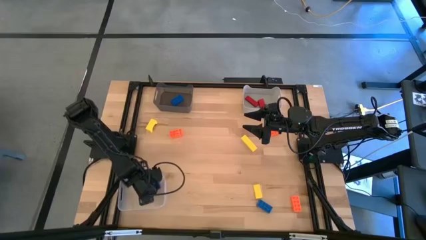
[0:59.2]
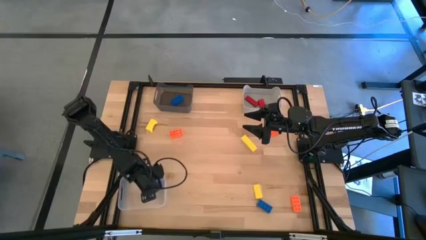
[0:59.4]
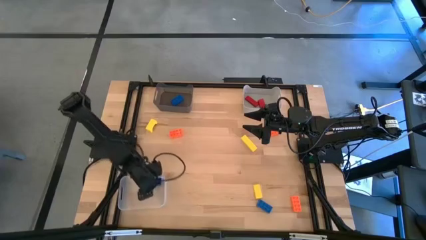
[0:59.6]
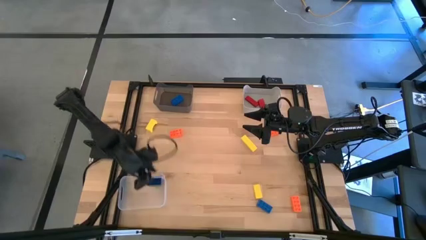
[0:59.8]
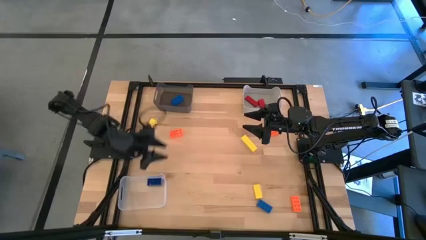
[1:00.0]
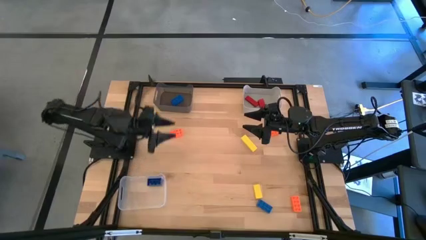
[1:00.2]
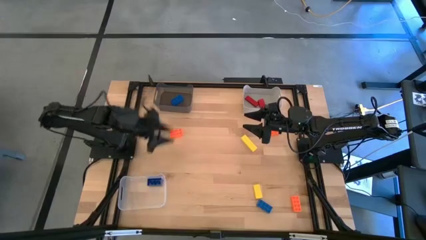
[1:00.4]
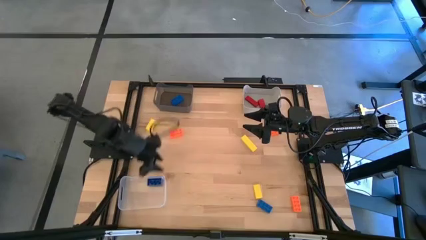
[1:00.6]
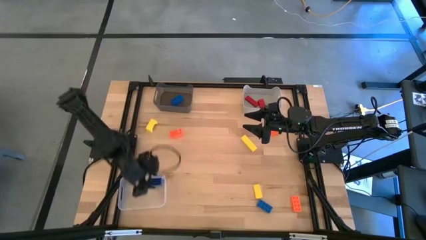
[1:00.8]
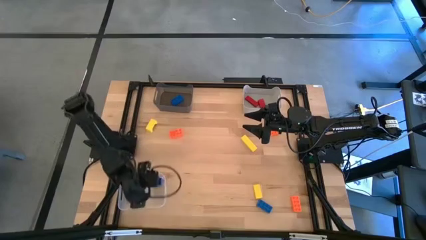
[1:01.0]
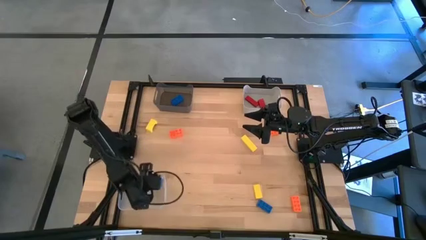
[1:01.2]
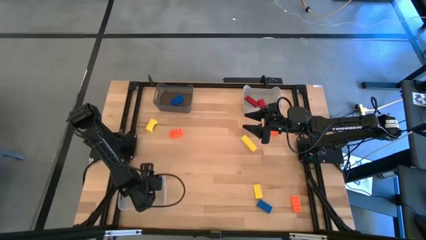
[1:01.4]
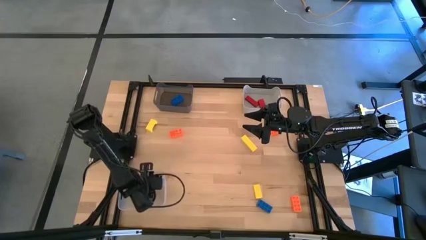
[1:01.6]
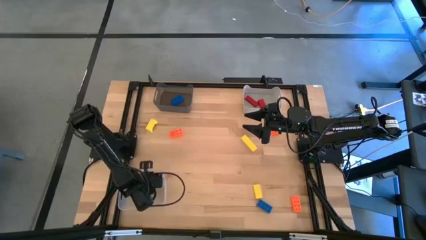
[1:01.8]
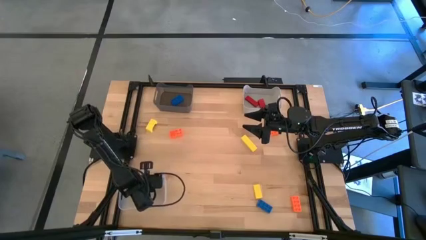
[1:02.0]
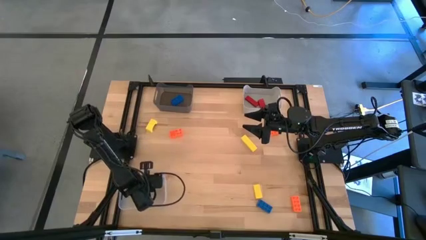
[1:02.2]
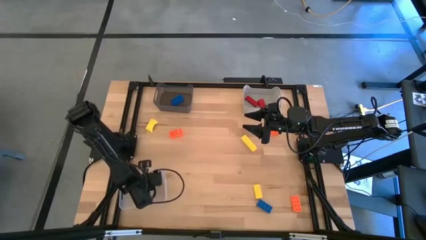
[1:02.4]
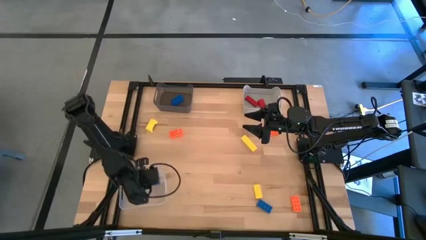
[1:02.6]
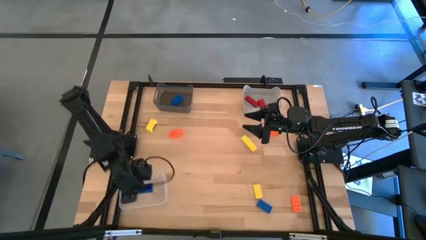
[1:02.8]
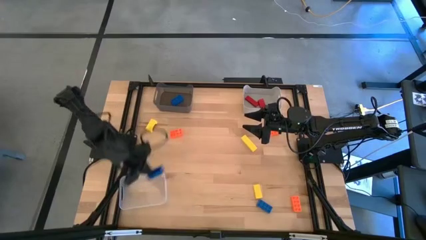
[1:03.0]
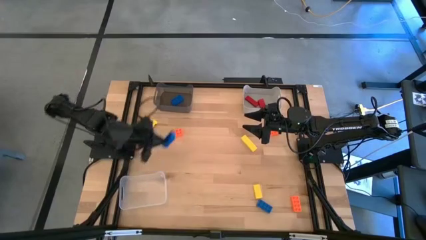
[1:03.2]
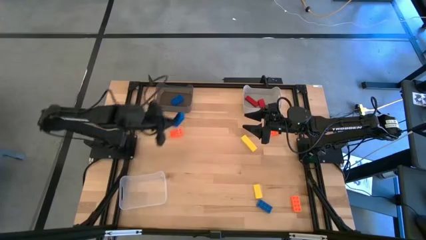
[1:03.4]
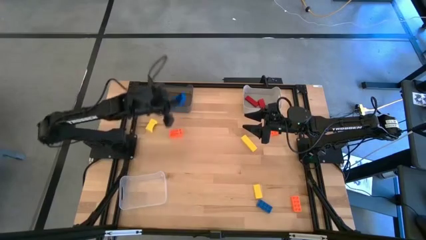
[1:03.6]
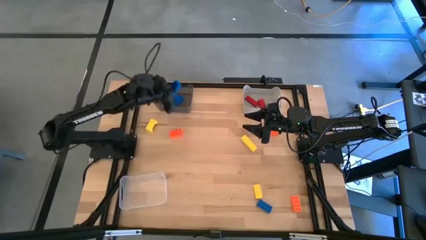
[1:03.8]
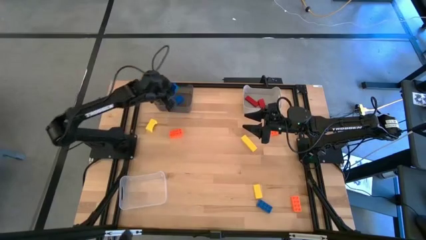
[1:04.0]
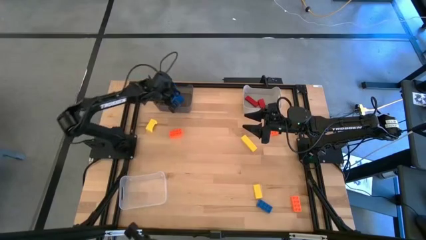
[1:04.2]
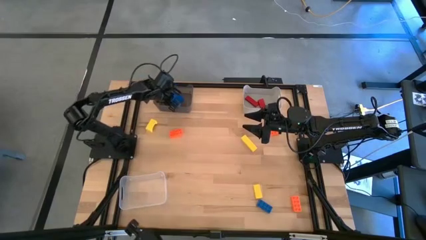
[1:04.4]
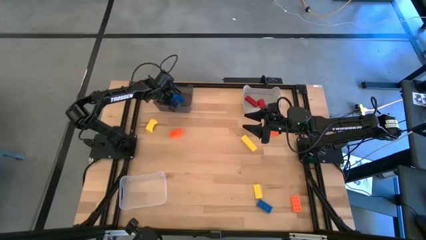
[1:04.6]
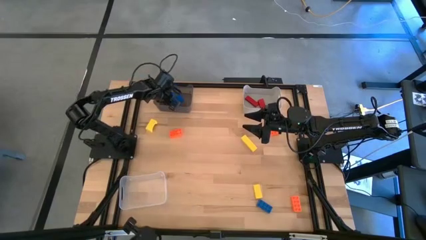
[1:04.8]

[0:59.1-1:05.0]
Task: Sort & place blocks by color
Put the top blue three stud game piece into the black transparent bin

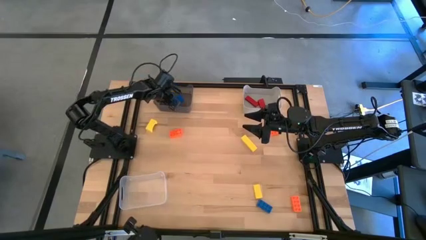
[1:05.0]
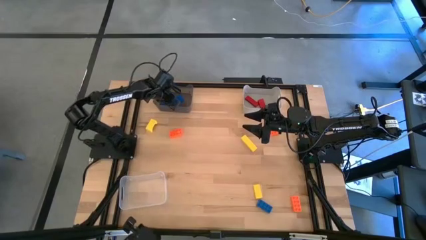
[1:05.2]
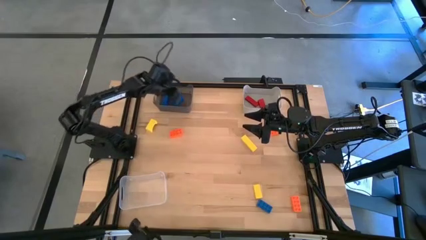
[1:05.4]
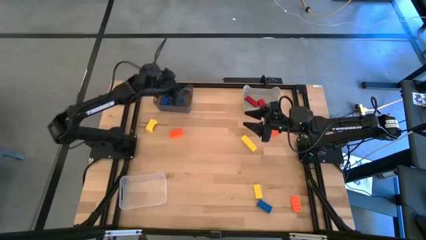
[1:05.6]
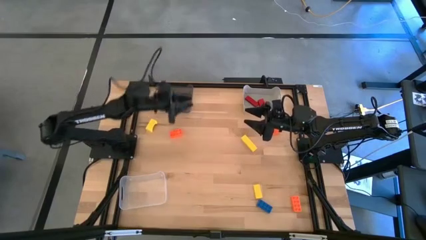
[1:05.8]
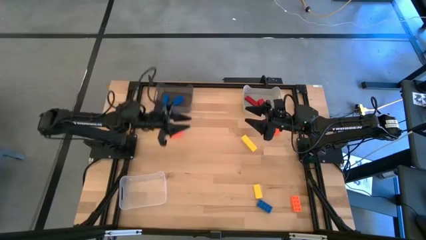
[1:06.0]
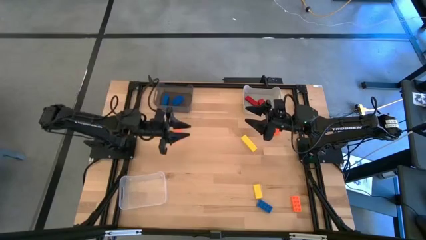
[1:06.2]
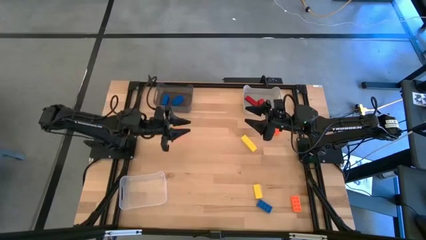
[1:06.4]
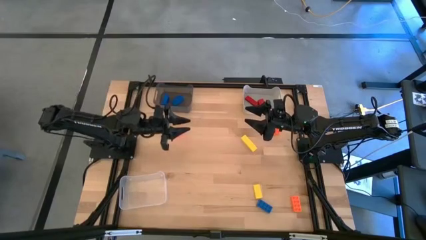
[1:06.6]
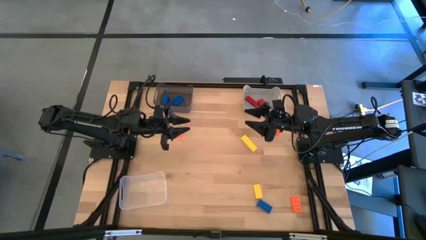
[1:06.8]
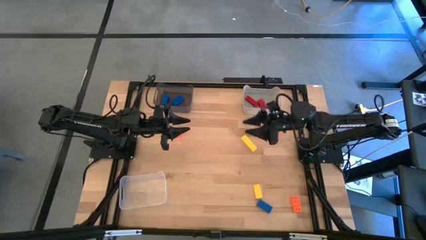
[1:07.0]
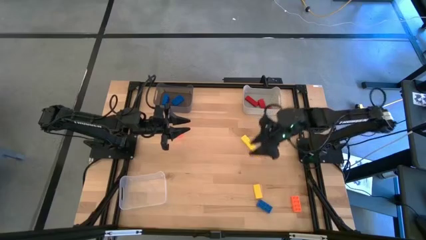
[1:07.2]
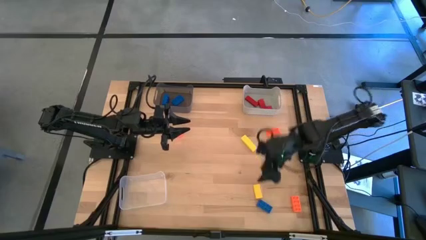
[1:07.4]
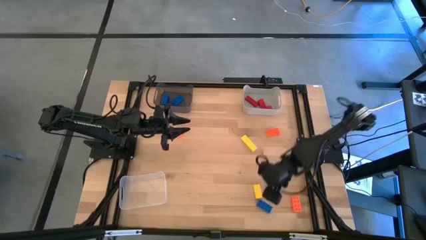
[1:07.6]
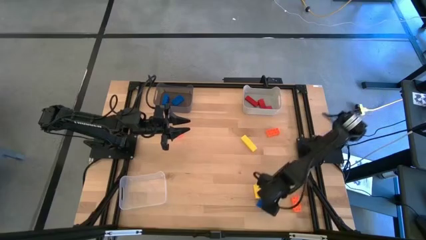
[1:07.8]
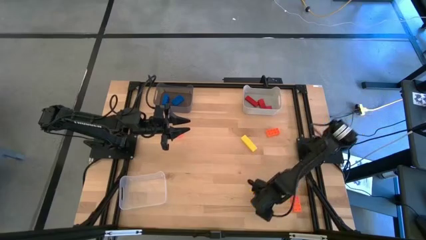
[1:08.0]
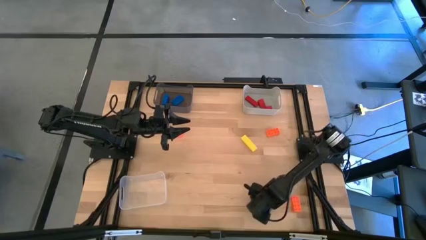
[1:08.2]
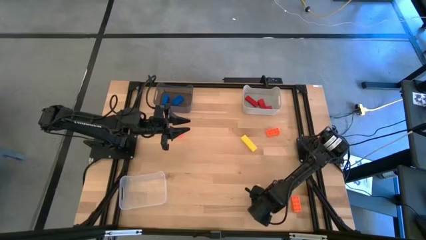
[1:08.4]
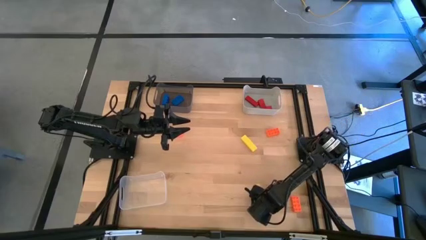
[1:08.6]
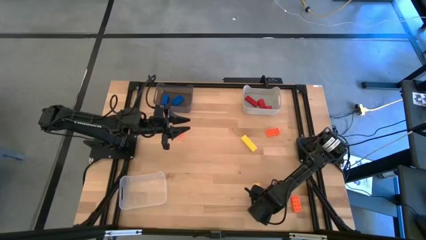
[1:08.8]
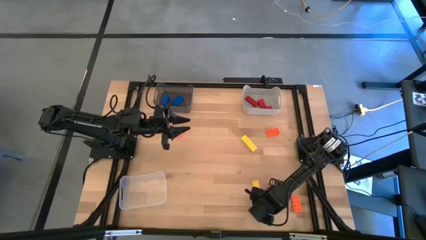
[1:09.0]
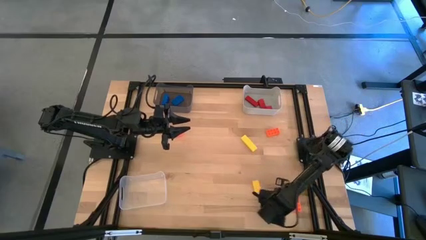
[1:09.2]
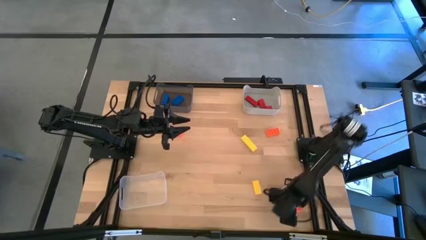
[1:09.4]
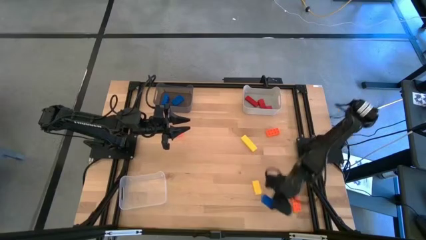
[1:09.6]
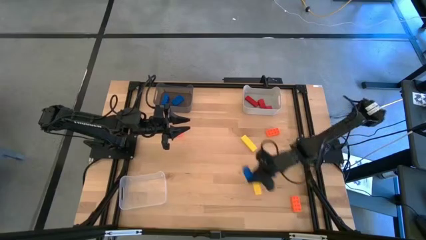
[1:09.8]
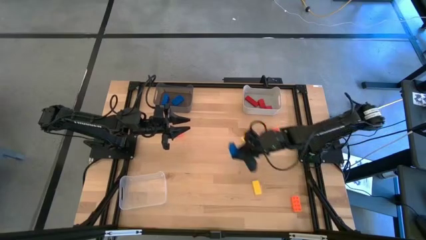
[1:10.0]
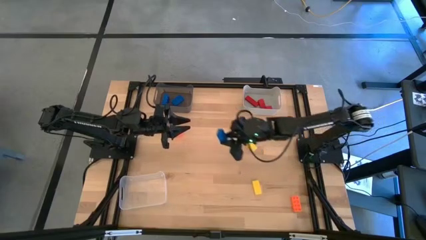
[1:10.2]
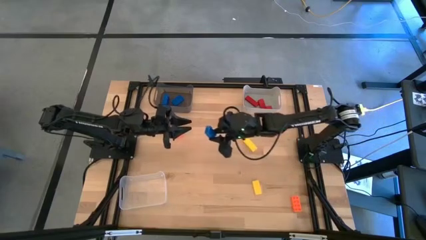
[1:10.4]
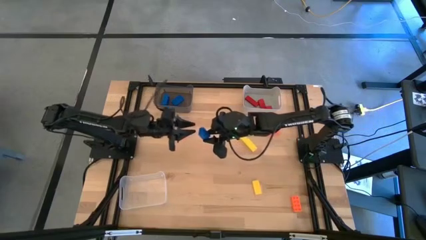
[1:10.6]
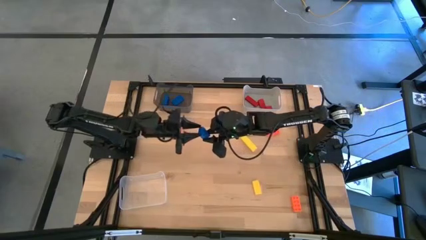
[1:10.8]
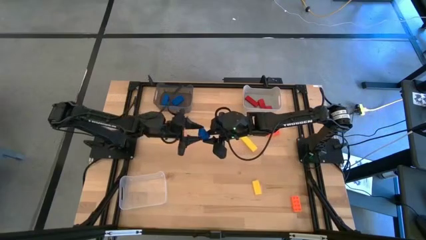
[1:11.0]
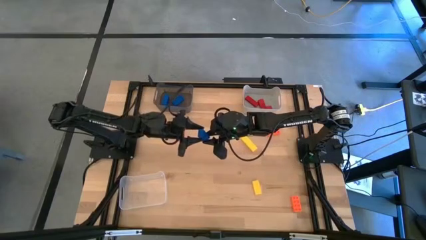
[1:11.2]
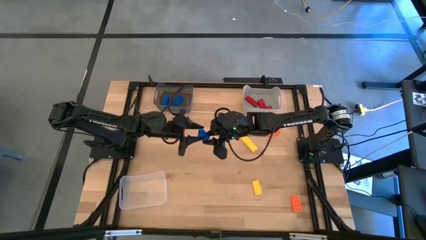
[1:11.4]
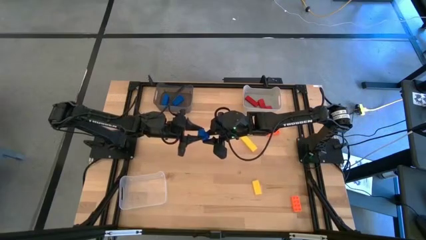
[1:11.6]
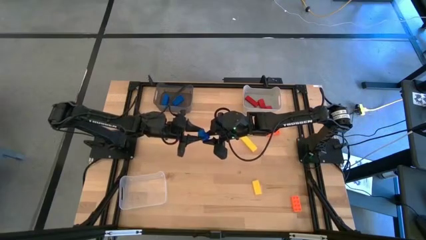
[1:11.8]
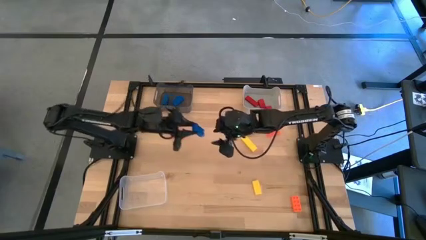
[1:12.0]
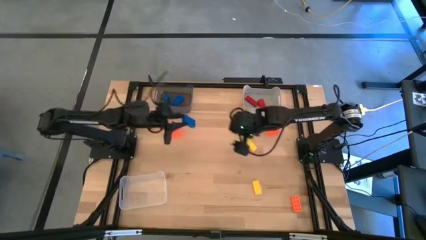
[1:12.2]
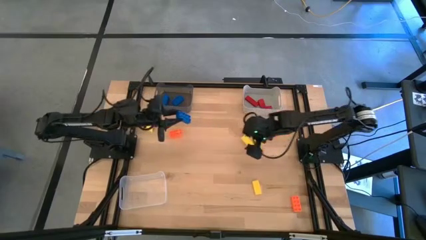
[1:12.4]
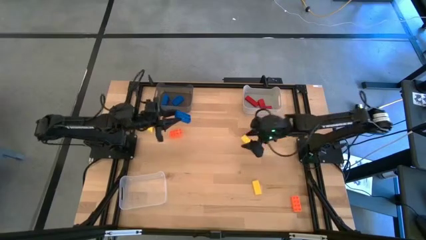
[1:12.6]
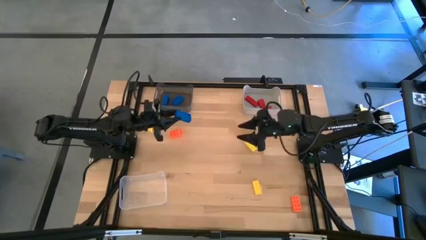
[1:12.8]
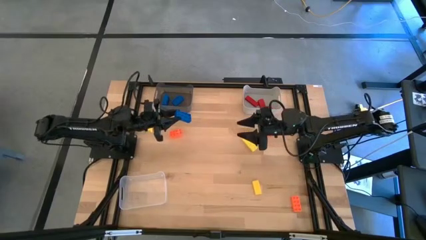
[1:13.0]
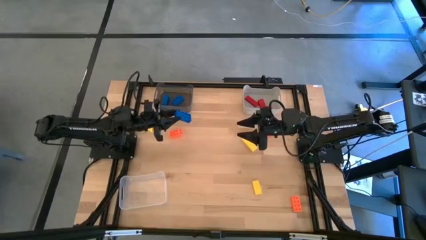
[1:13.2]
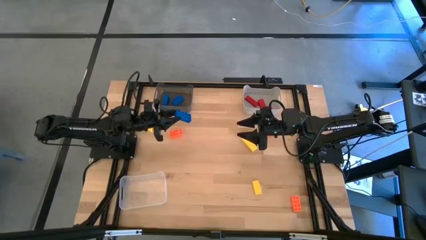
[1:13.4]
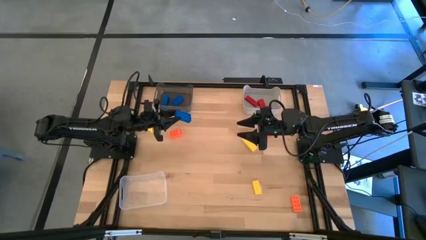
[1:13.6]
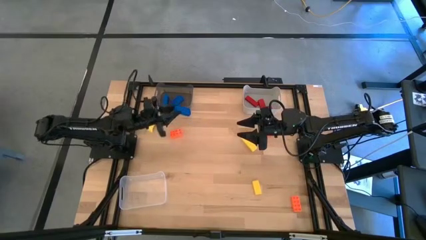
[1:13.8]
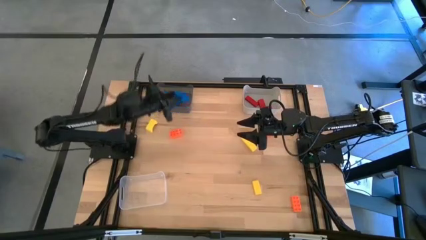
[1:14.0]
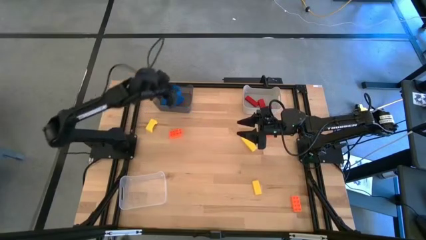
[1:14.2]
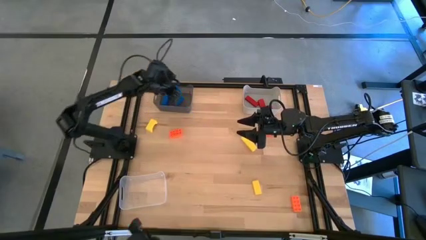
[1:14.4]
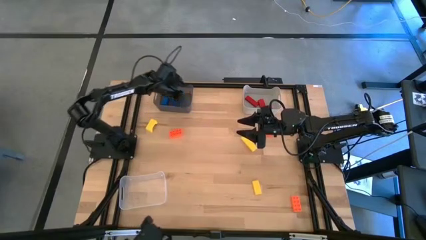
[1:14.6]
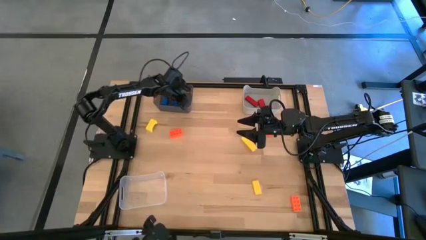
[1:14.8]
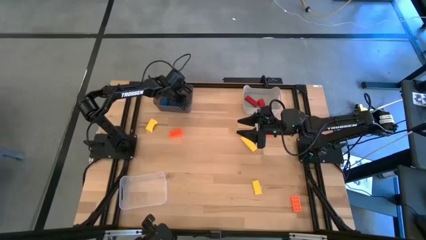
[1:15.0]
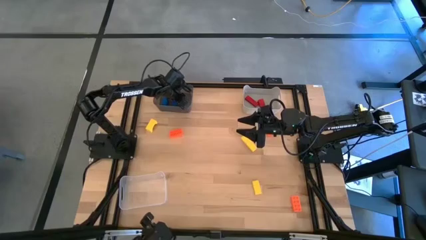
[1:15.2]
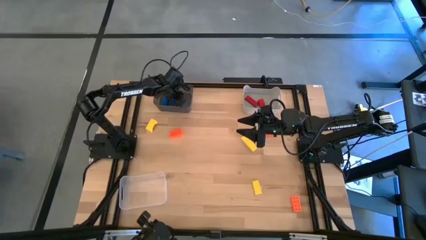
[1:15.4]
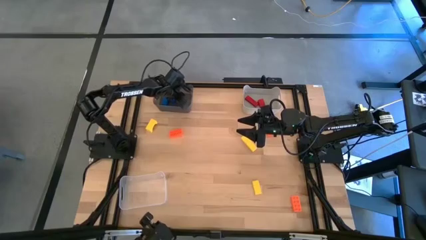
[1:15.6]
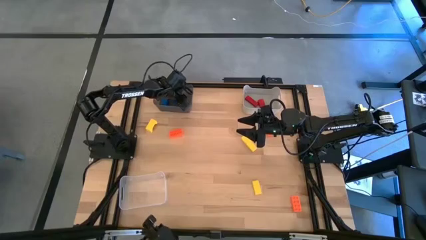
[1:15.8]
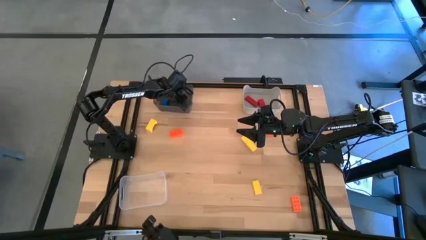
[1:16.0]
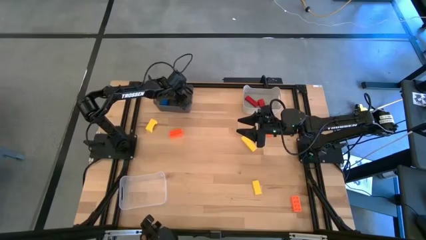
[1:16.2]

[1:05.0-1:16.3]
Put the blue three stud game piece into the black transparent bin
